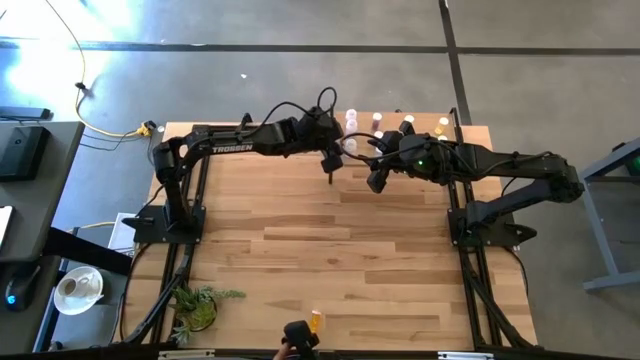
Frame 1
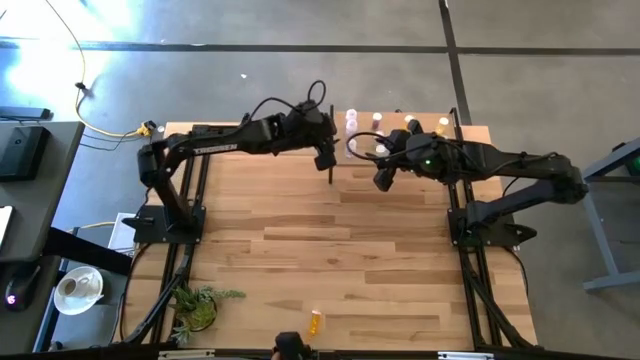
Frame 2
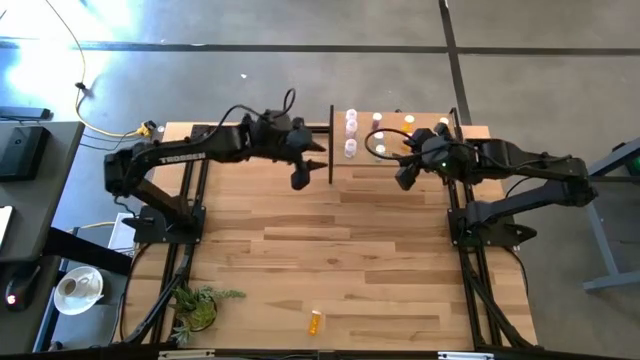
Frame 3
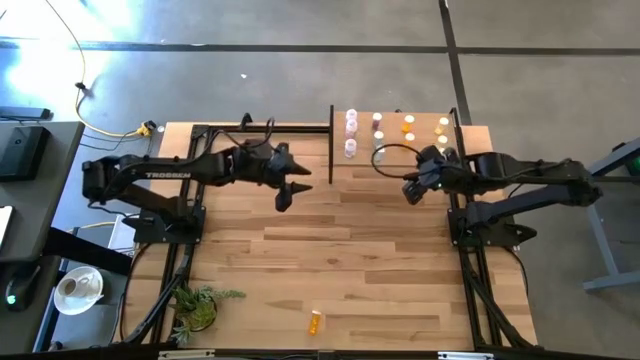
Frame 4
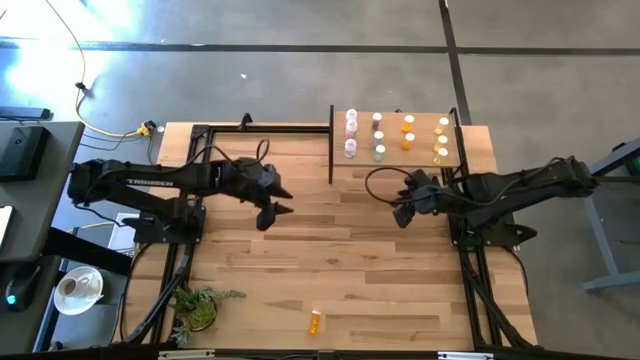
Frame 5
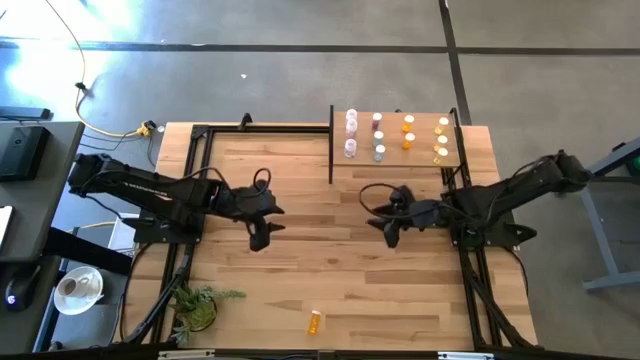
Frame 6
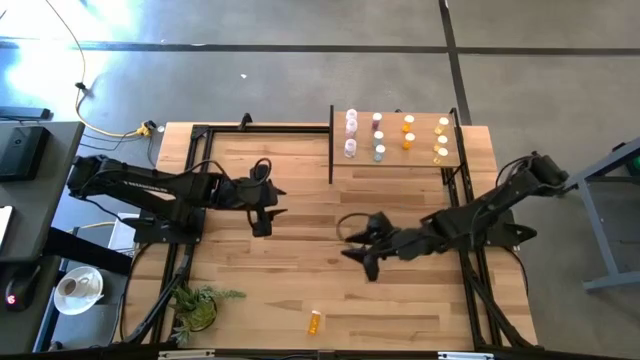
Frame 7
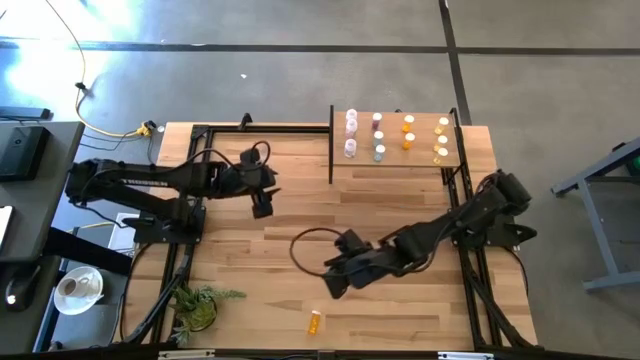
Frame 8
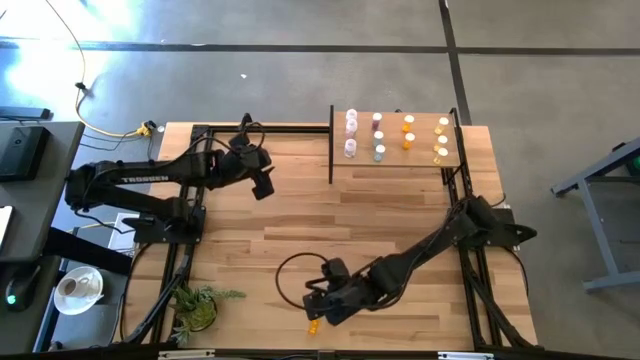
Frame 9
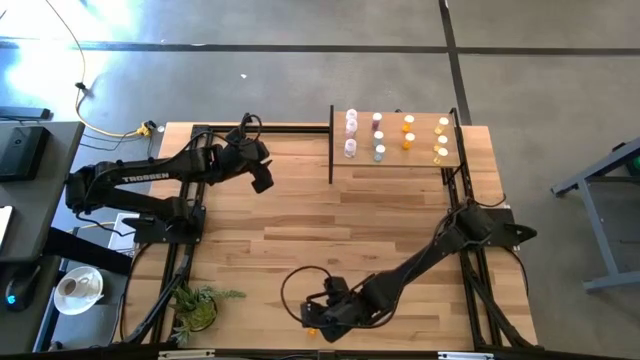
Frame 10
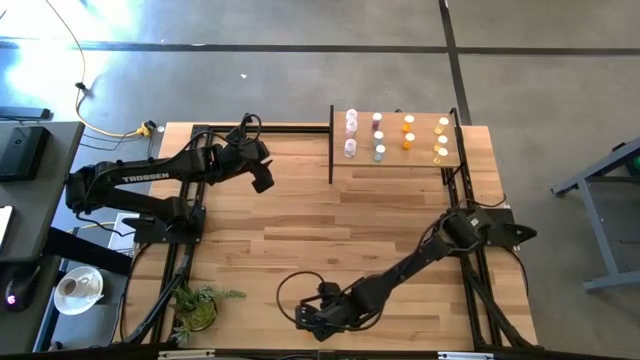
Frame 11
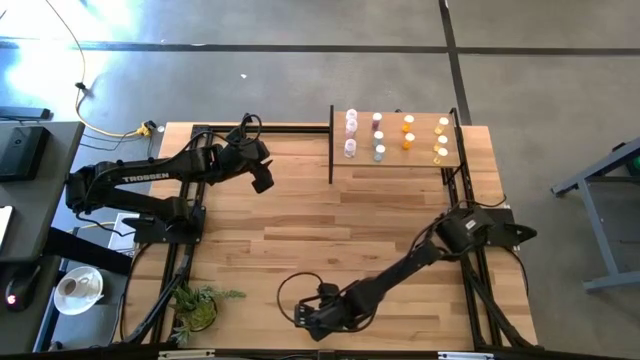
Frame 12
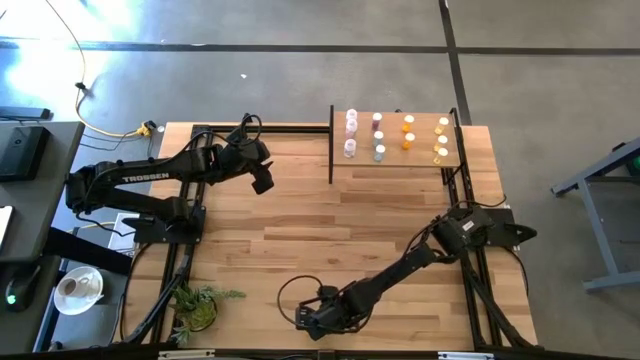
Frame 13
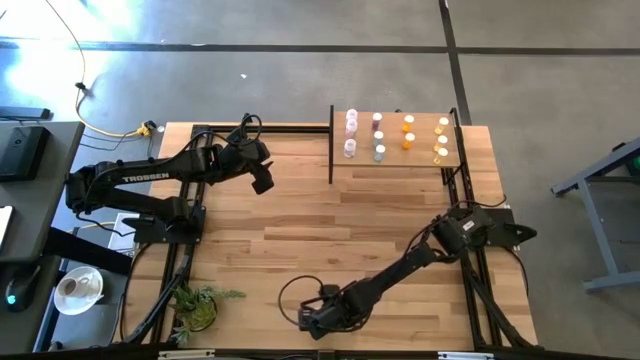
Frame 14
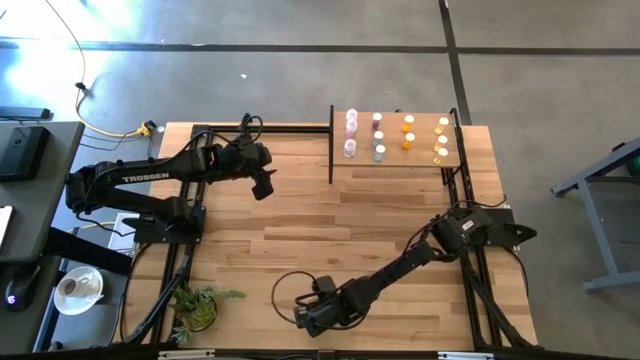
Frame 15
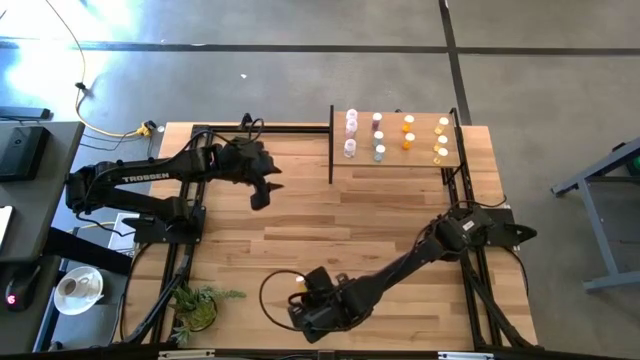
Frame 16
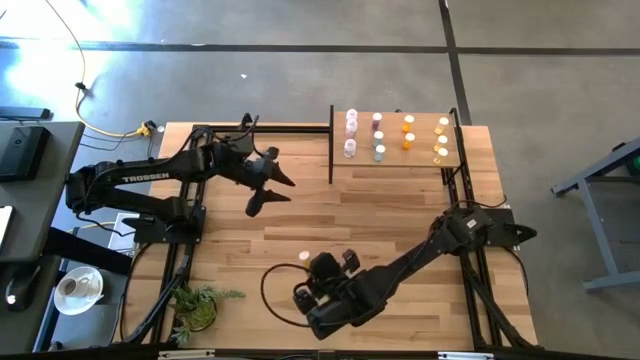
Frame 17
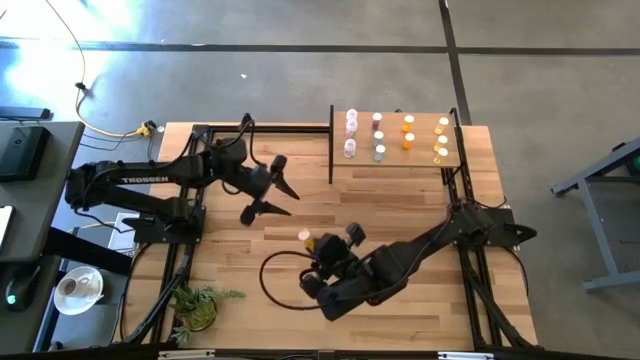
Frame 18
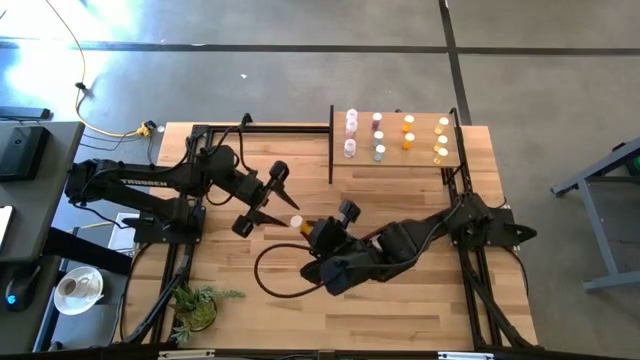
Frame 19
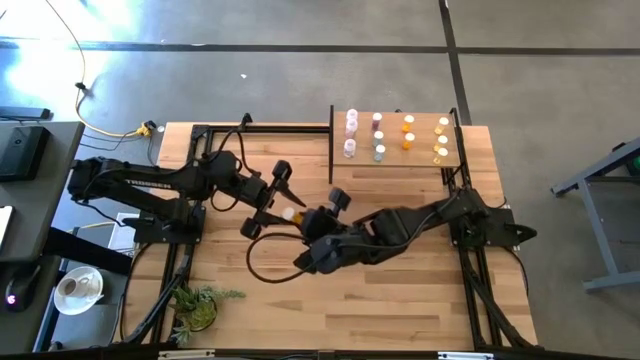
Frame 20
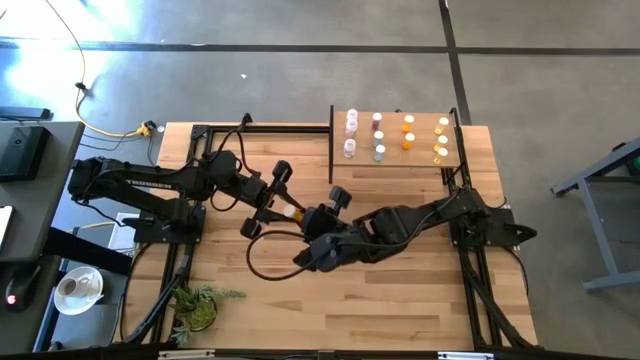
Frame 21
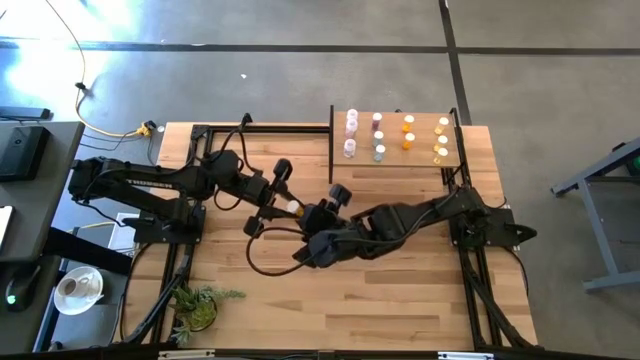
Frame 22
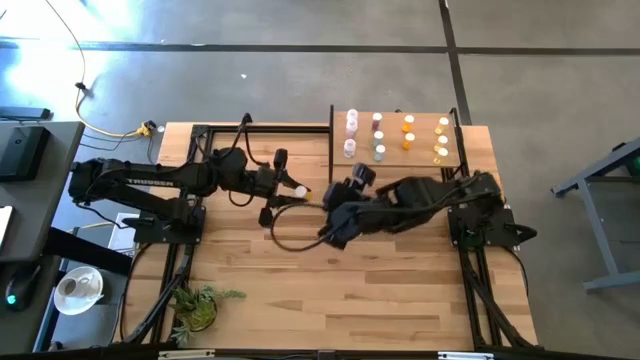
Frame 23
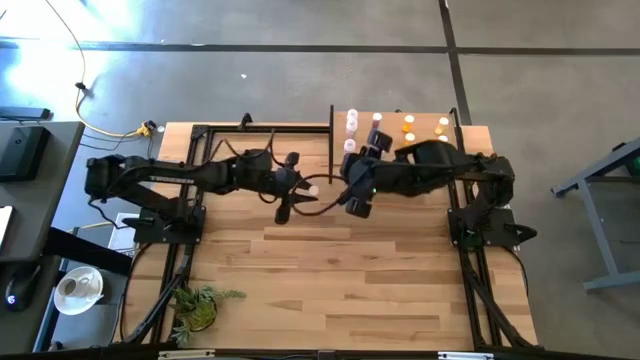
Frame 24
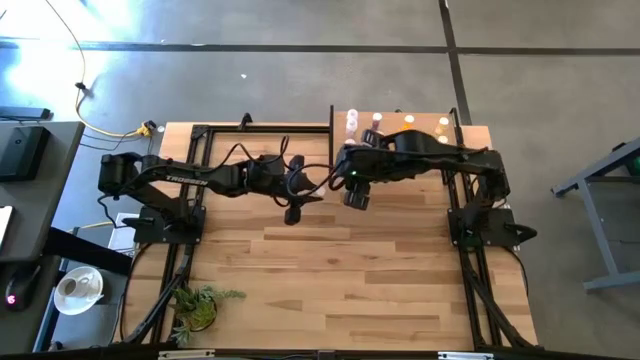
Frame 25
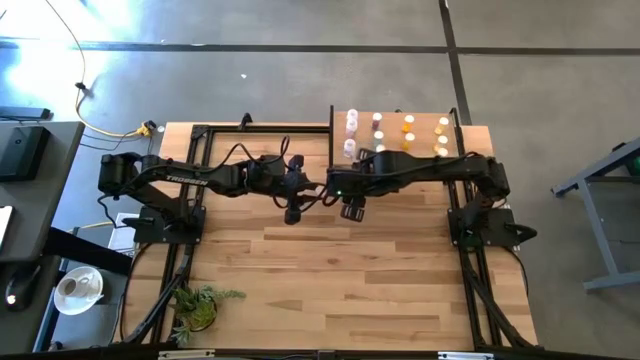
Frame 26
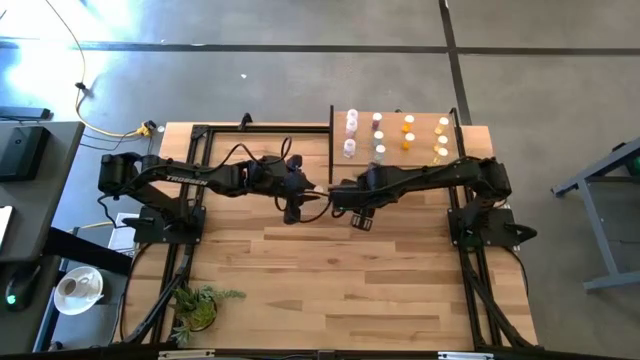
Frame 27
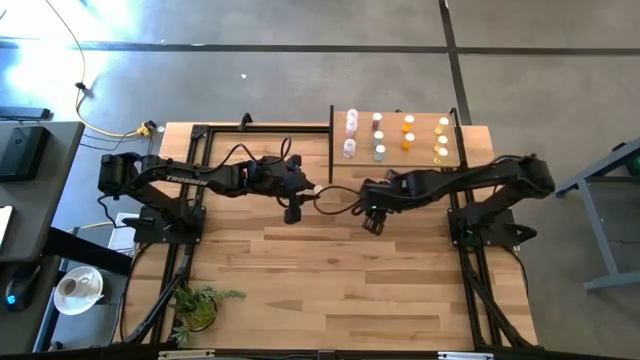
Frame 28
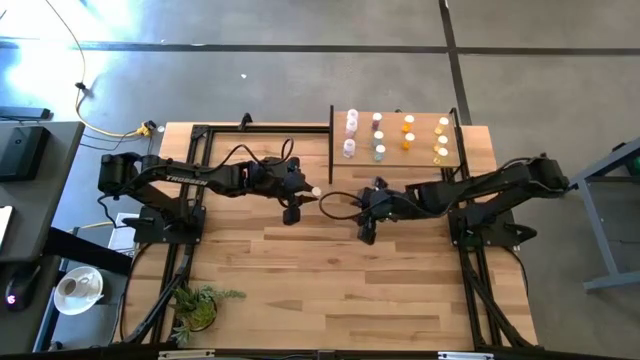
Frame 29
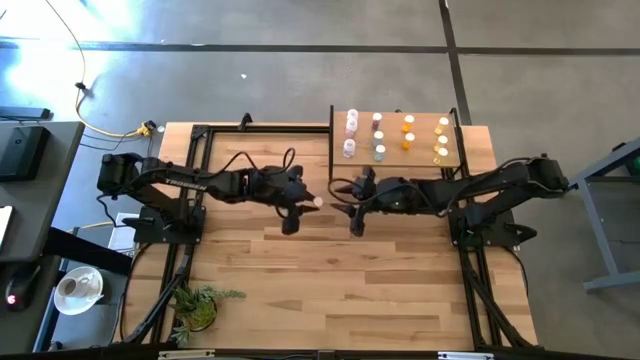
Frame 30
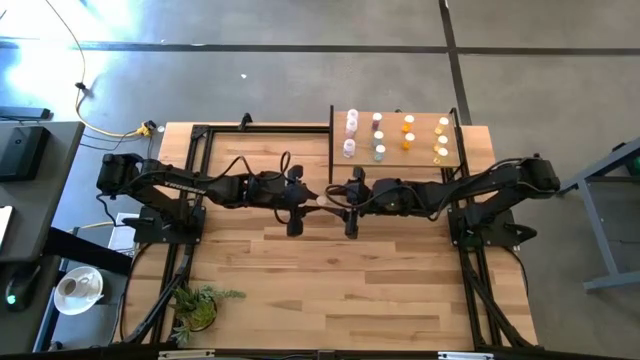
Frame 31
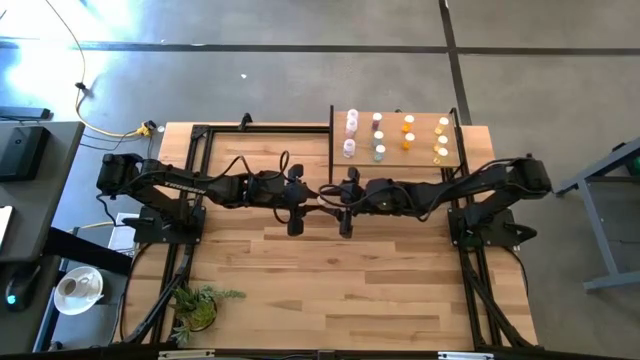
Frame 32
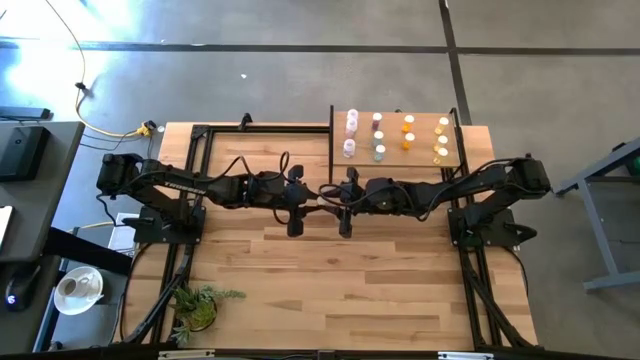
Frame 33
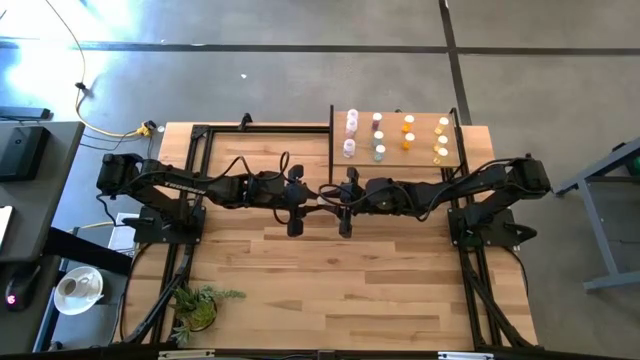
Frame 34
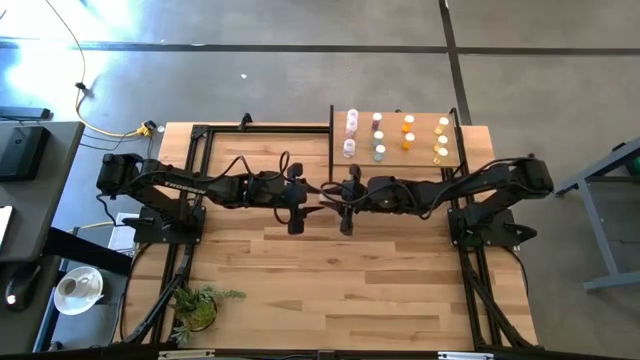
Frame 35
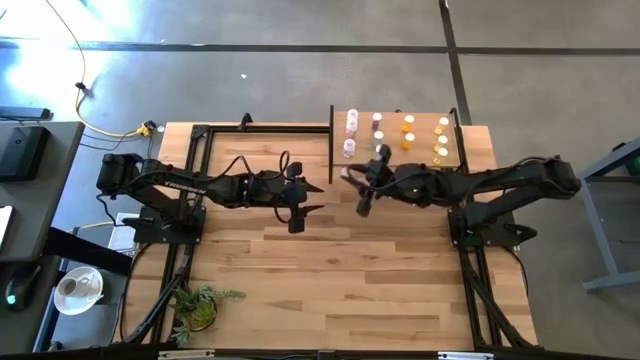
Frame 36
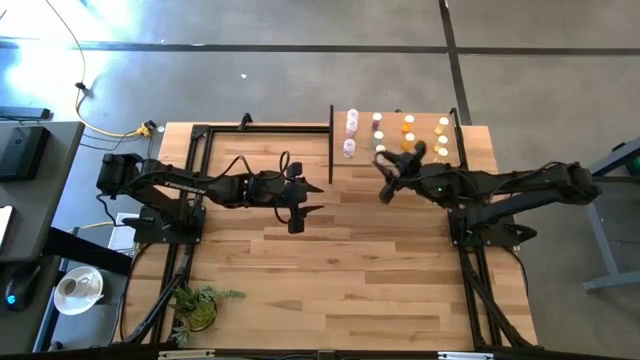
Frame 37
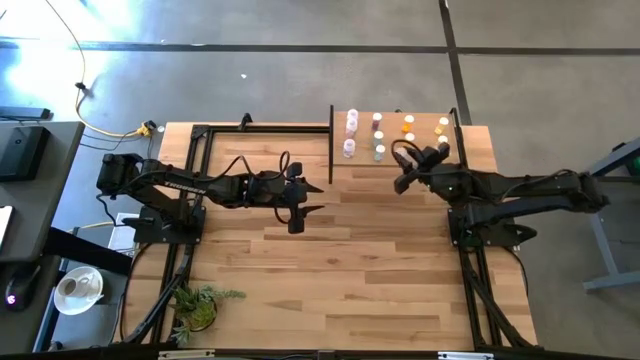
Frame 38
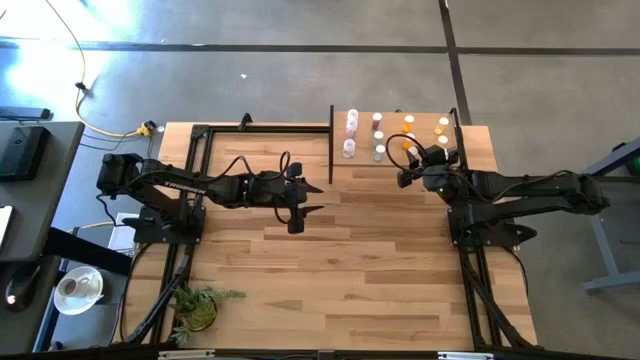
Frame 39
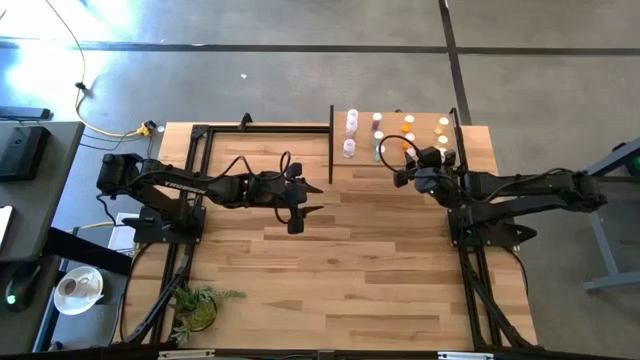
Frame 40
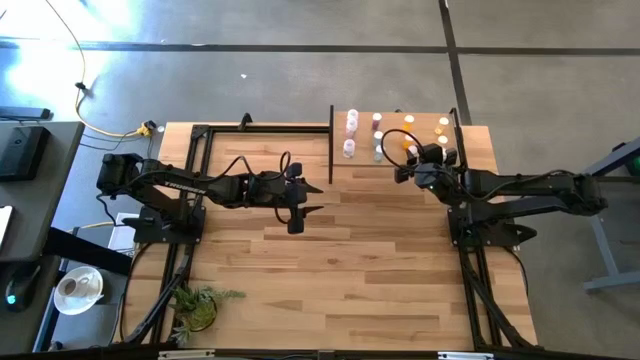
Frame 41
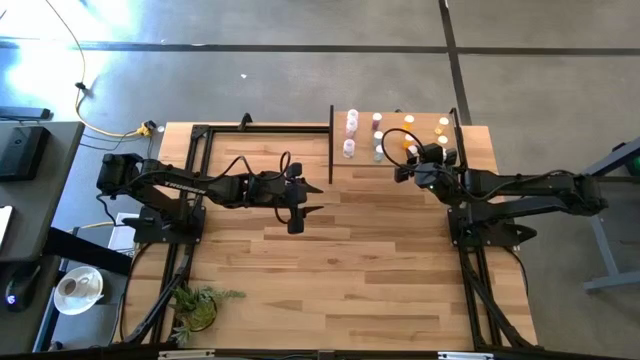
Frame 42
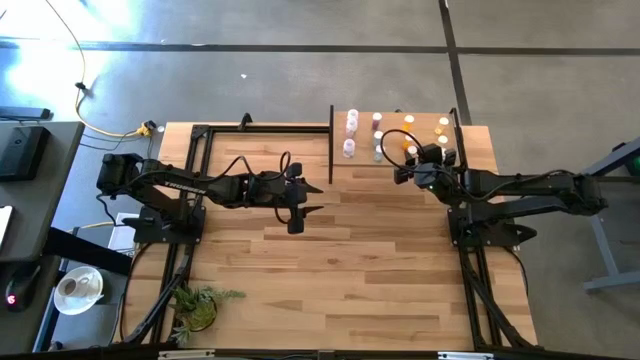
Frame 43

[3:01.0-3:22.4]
Task: Pick and place medicine bottles onto shelf by color
Put the orange pill bottle on the shelf aligned with the other orange pill bottles
